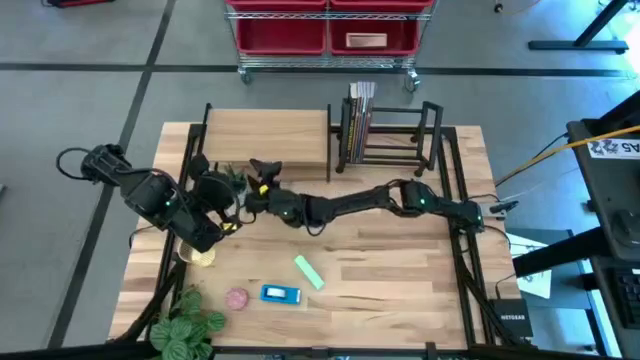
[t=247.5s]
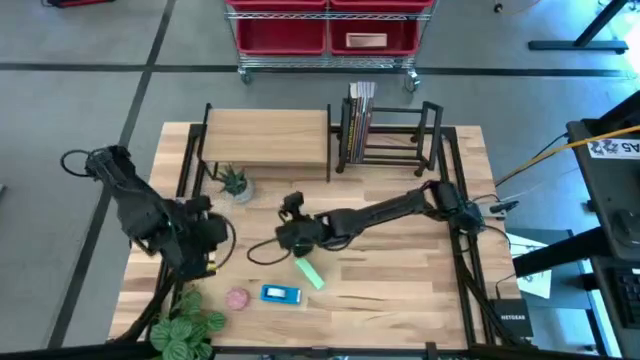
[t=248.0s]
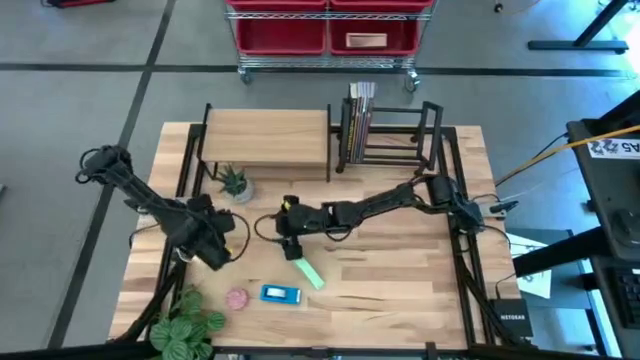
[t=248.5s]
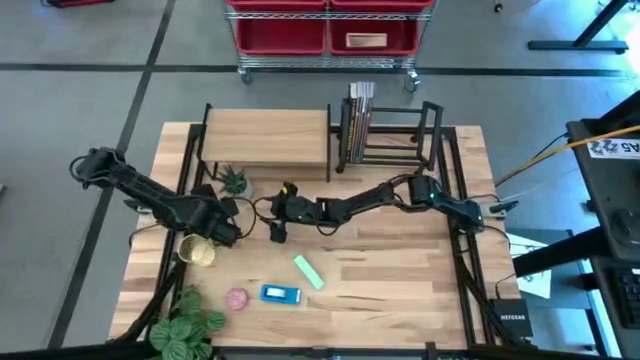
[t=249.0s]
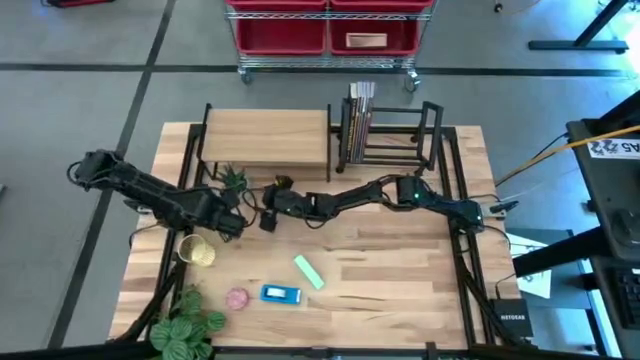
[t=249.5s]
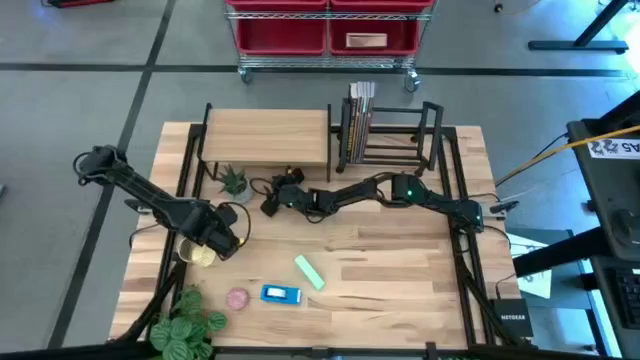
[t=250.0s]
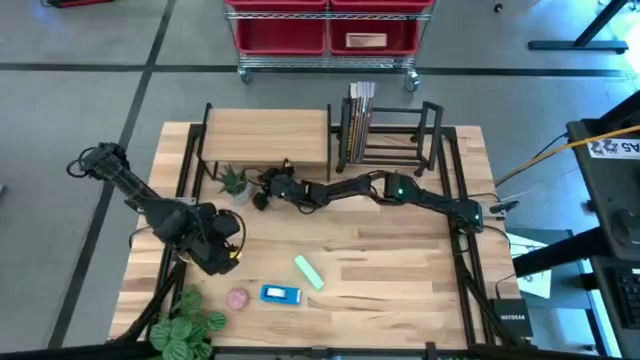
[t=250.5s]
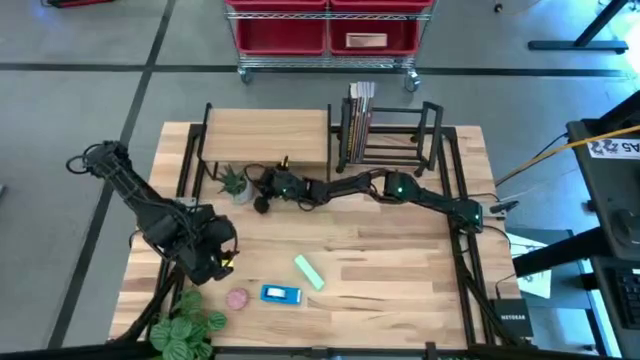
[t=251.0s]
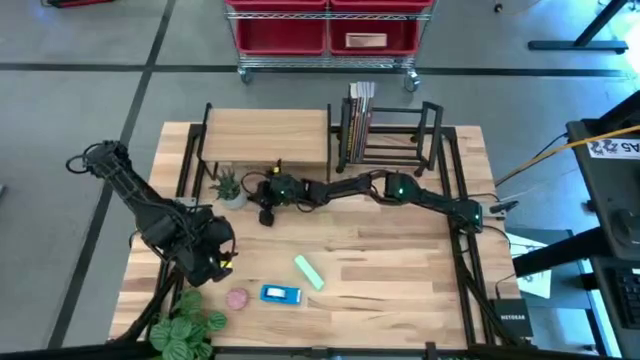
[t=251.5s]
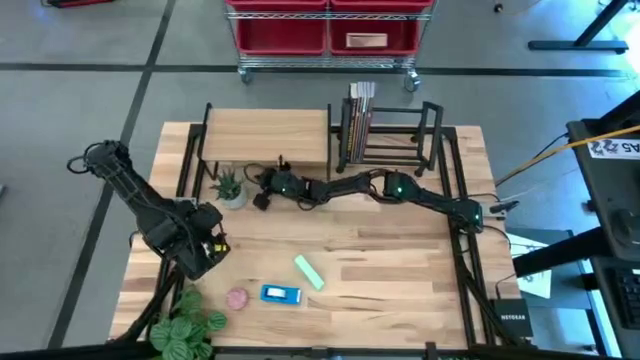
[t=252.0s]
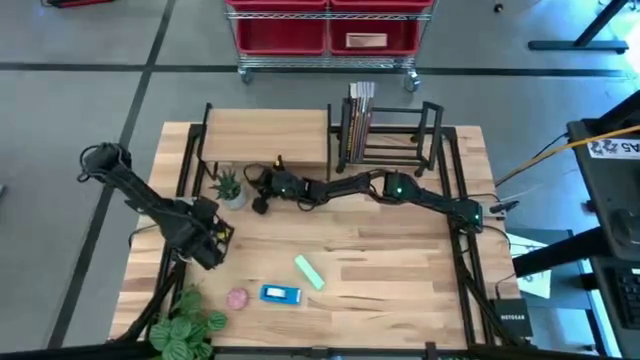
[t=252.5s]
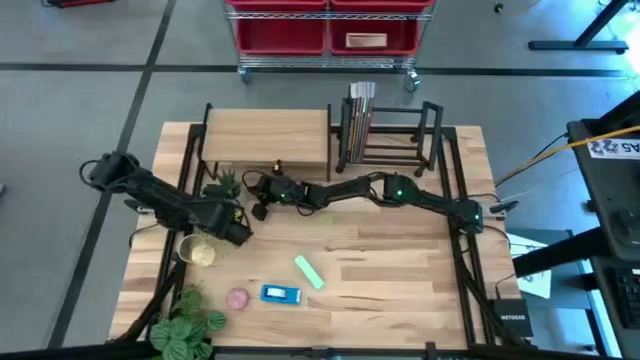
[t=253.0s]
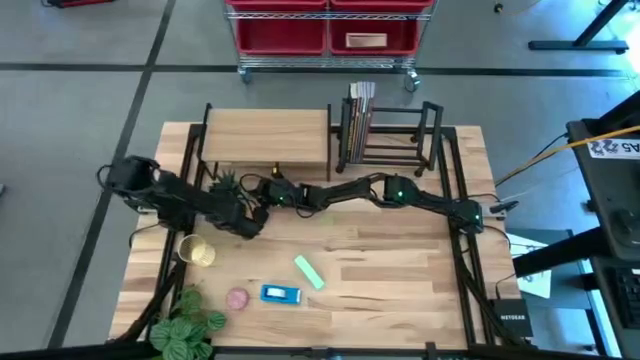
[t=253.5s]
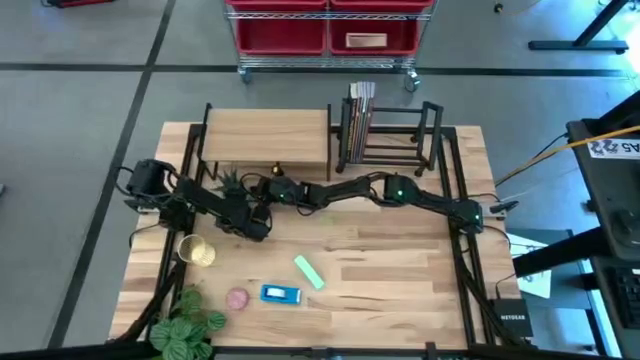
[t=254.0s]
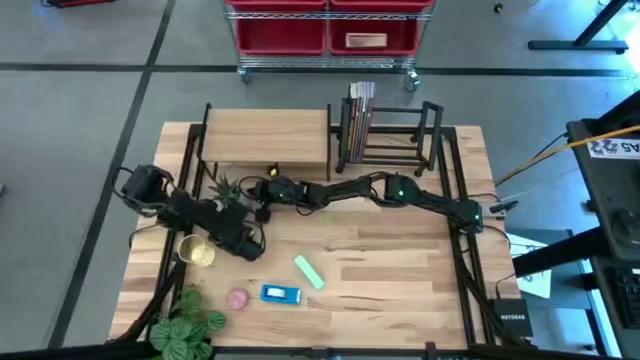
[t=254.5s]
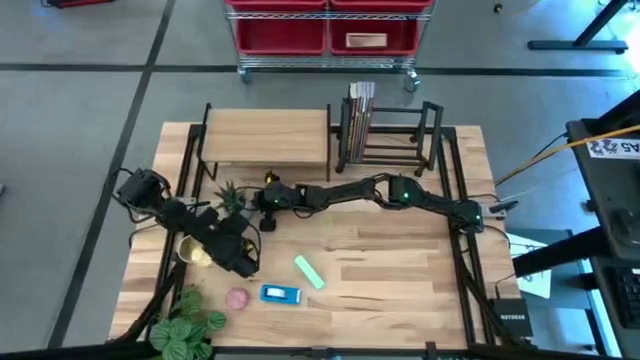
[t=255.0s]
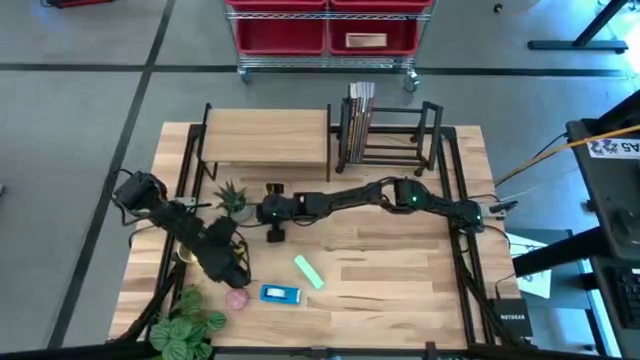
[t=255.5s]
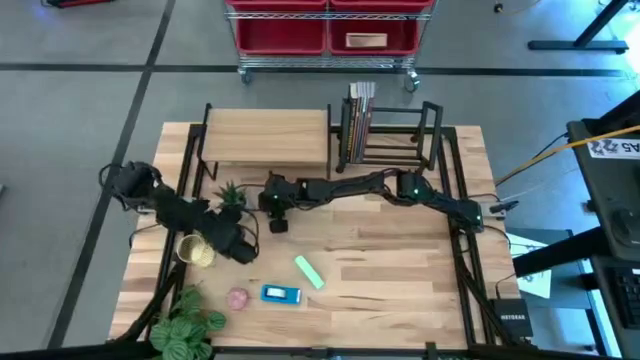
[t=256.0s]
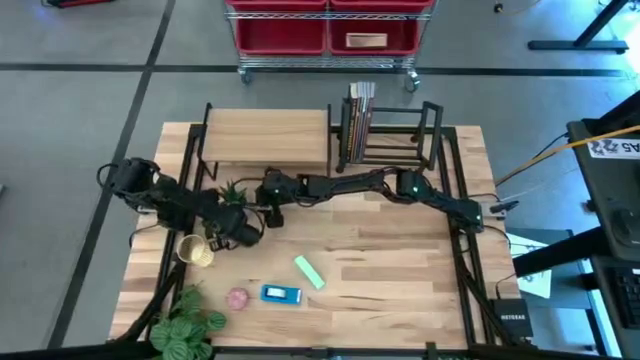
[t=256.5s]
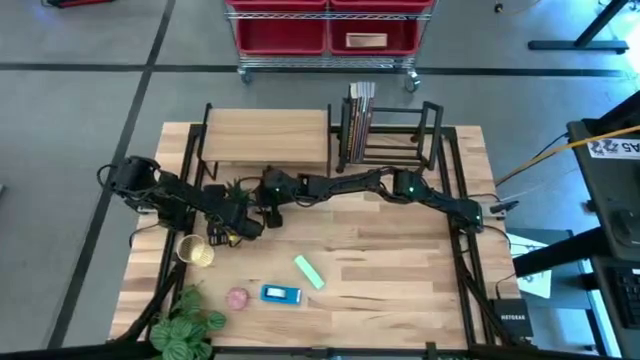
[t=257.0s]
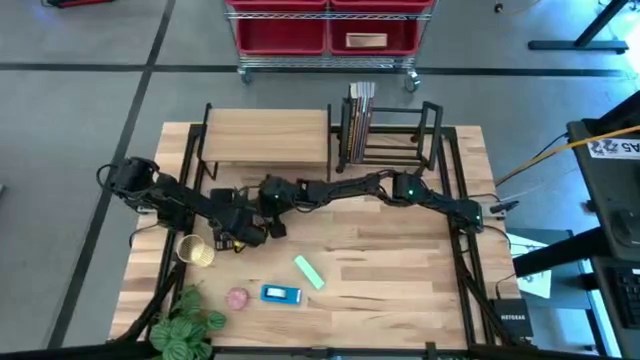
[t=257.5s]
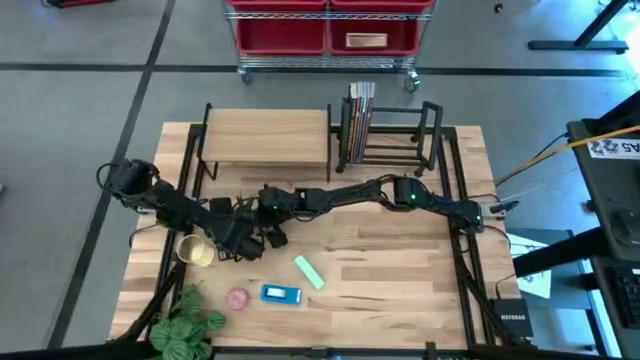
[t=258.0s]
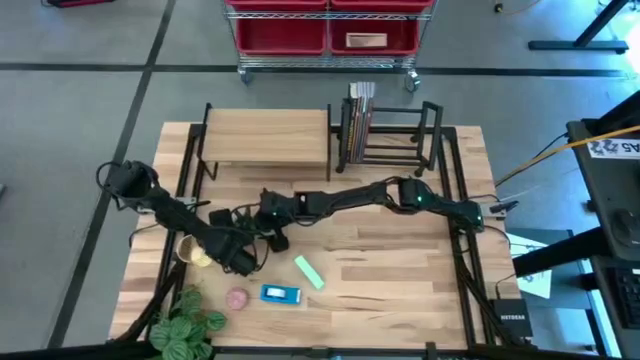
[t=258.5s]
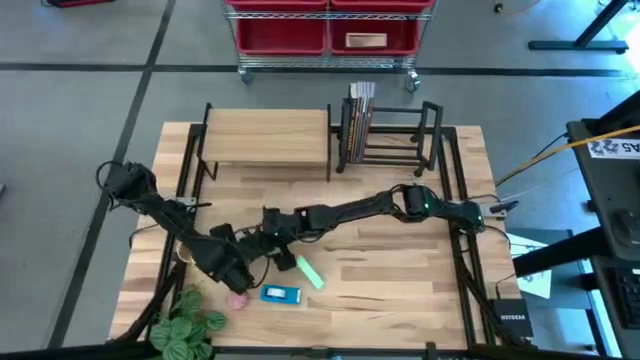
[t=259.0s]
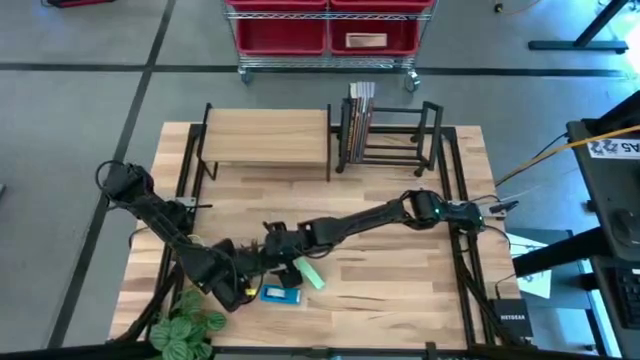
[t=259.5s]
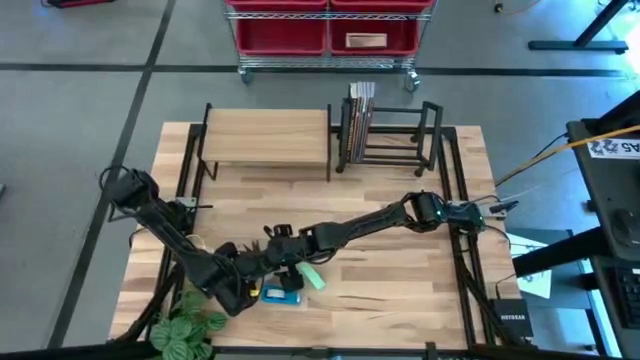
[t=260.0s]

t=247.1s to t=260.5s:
Task: Stock shelves
Remove the gray plotted plant from under the shelf

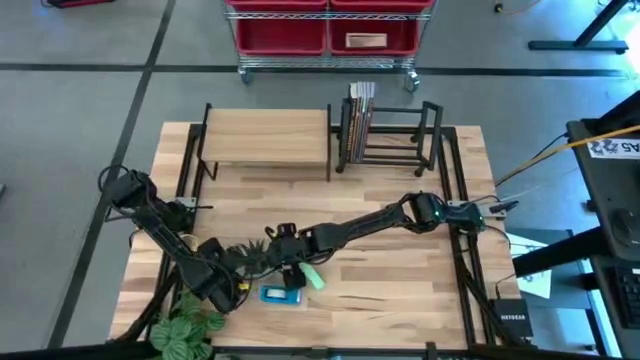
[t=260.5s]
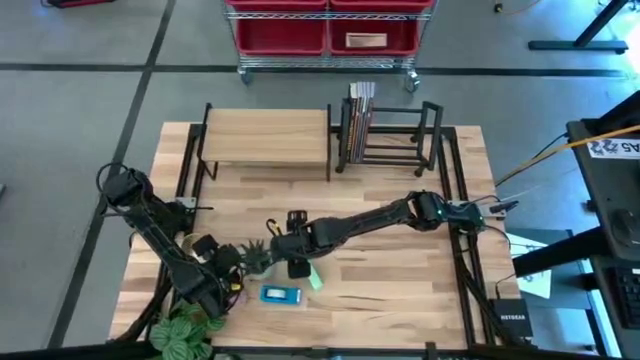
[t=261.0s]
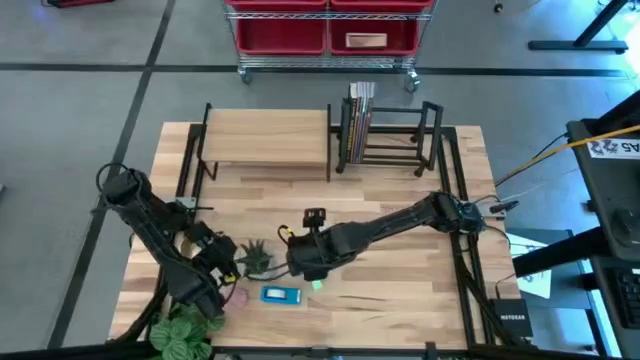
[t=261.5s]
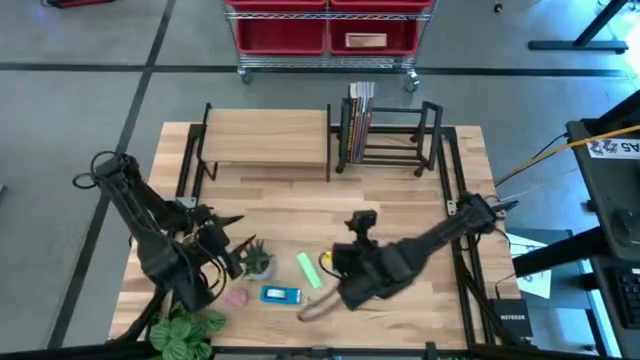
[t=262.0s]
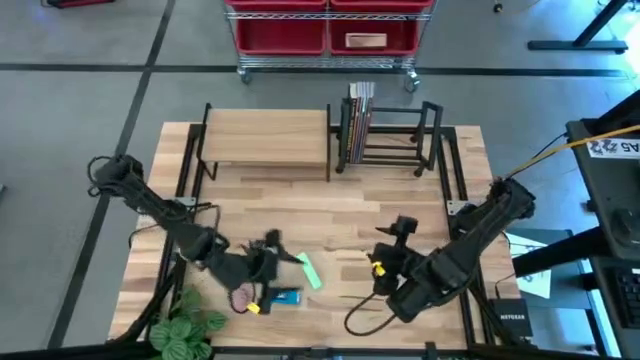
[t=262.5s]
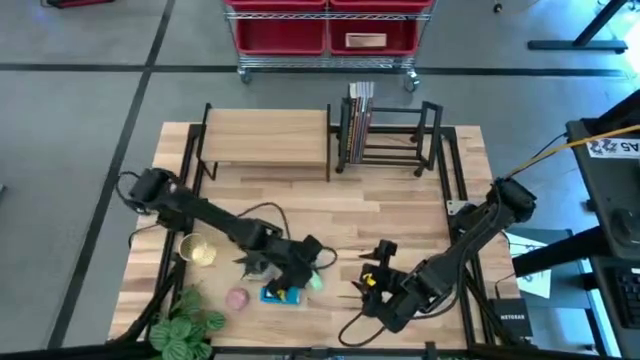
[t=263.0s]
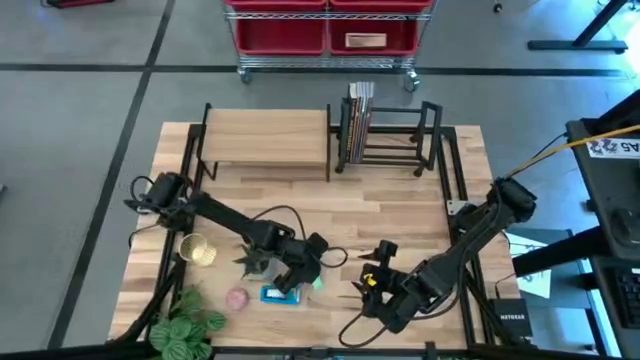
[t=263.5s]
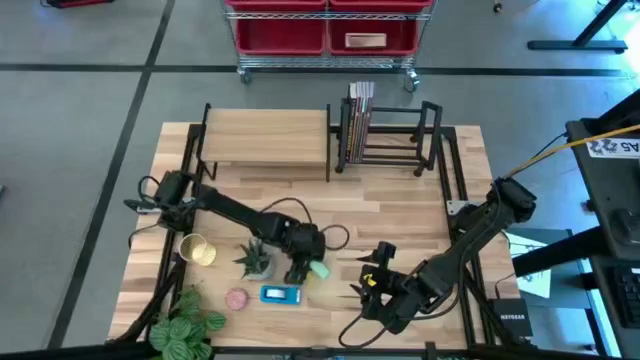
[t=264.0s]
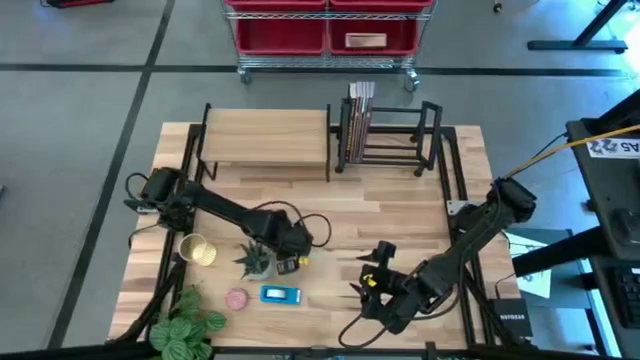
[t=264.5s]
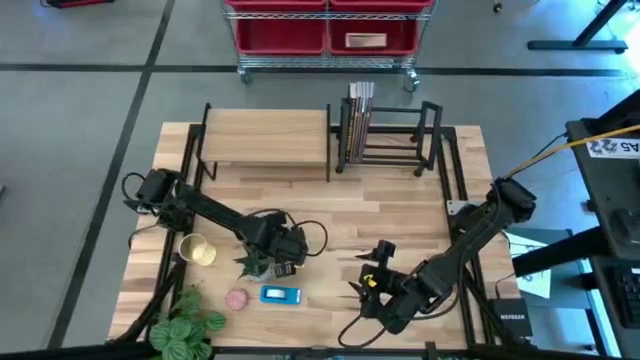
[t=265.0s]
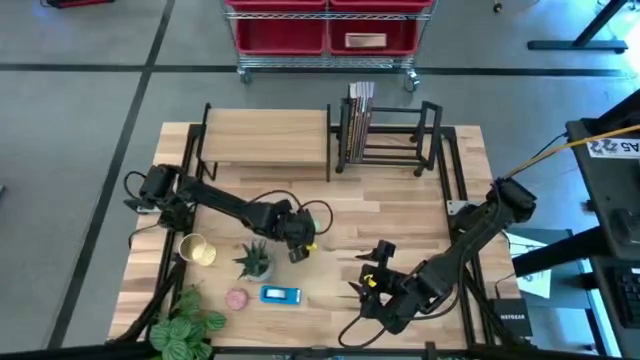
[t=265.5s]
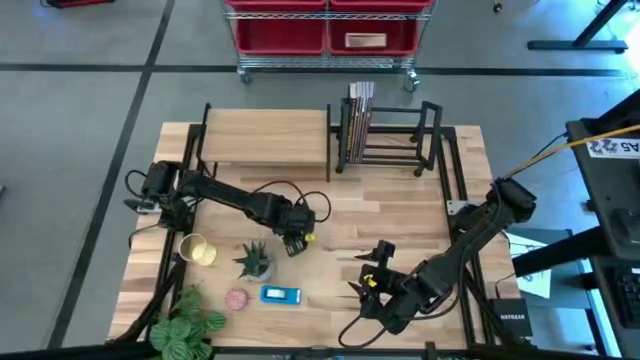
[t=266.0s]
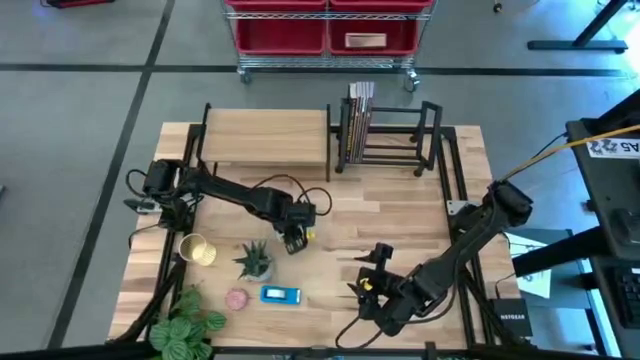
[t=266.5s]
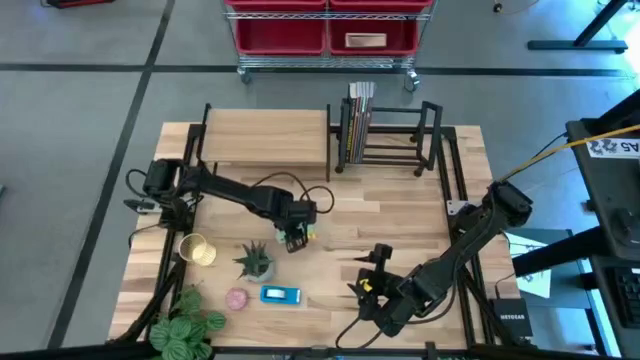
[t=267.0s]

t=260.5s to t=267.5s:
Adjust the green stapler to the center

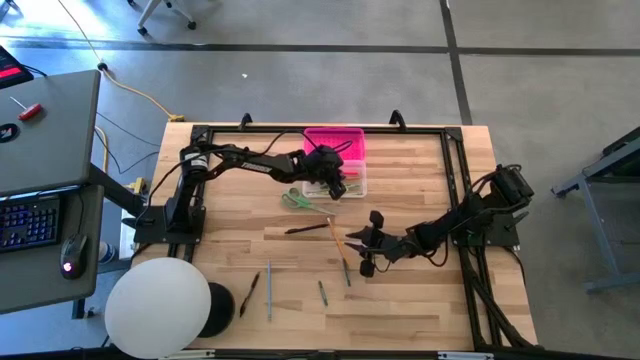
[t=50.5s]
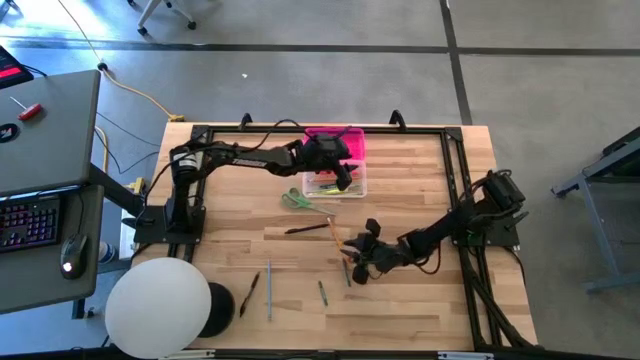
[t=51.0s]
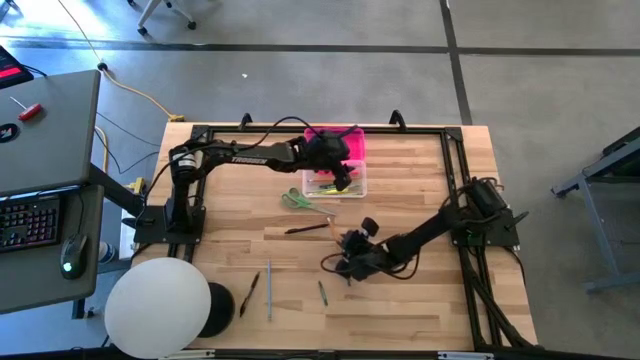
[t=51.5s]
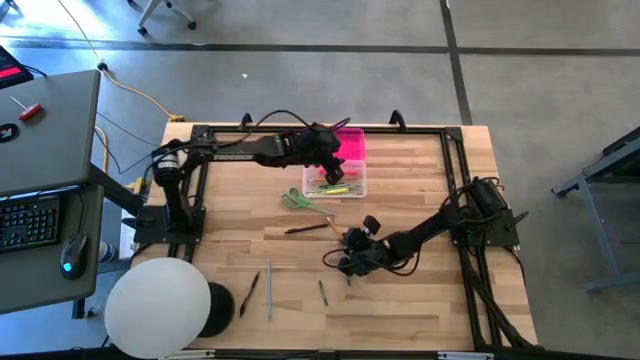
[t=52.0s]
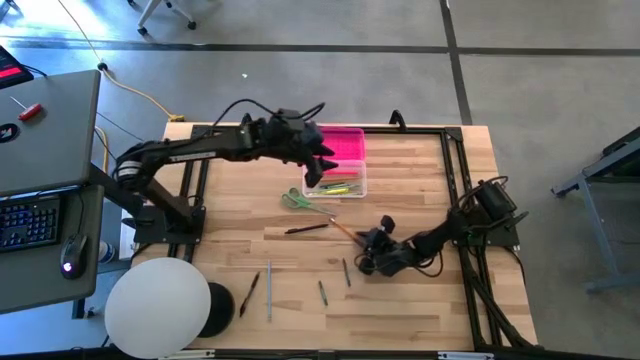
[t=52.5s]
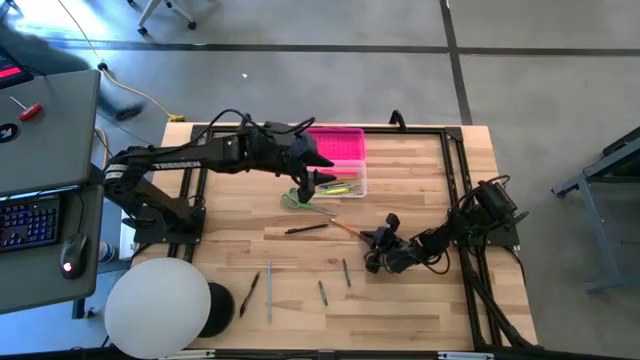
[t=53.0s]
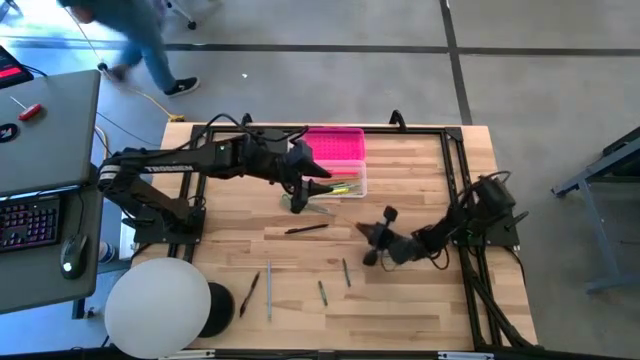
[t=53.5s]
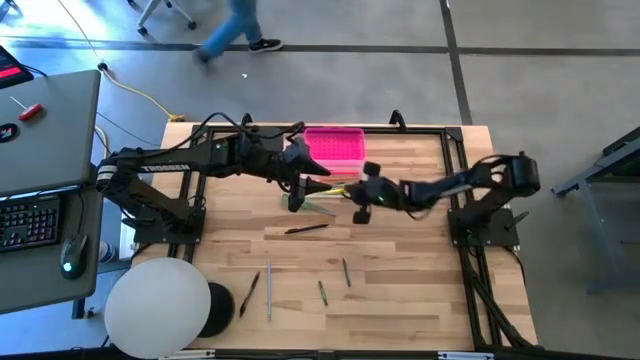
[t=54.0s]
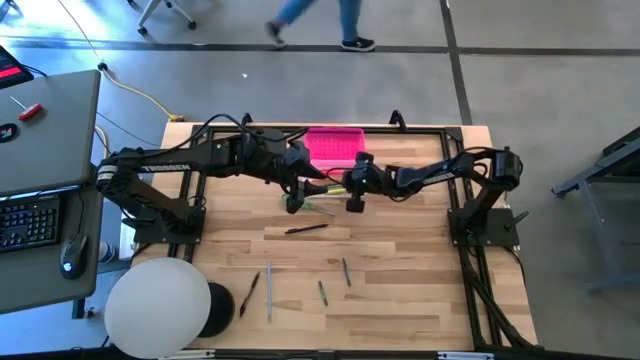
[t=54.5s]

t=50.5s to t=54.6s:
Task: Pick & place school supplies into a supply box
Put the yellow pencil into the supply box
